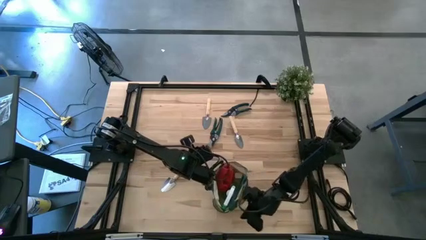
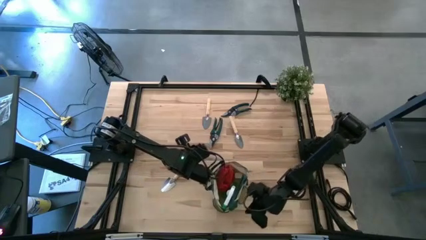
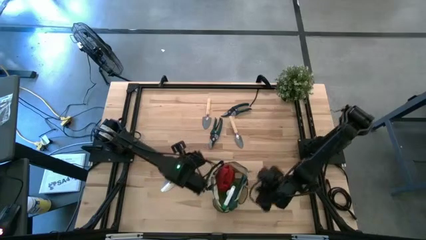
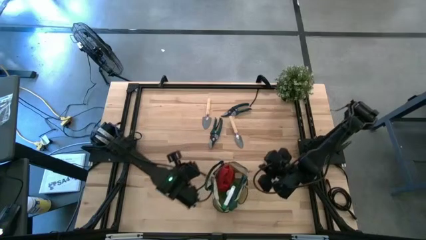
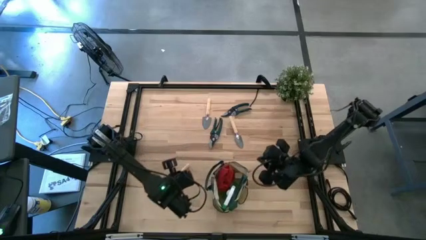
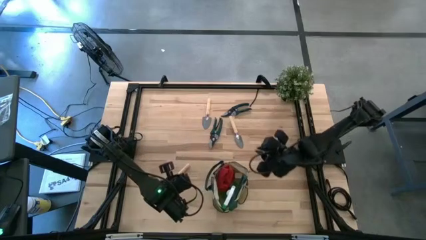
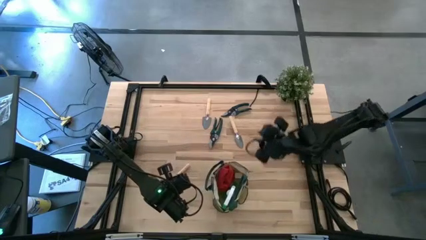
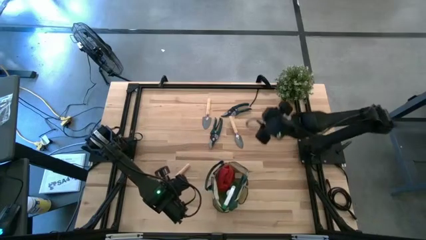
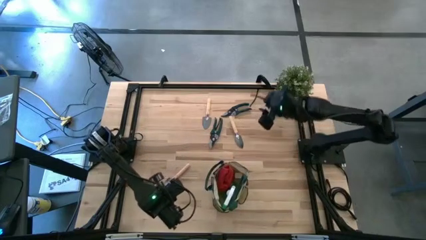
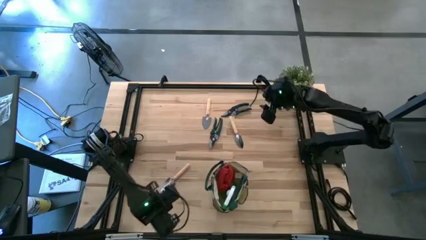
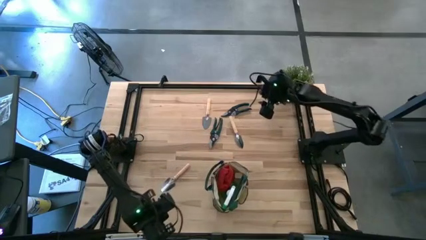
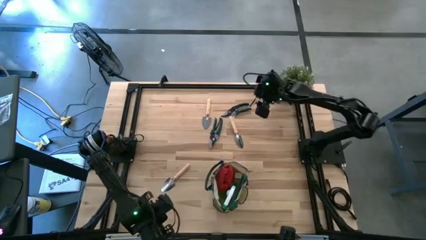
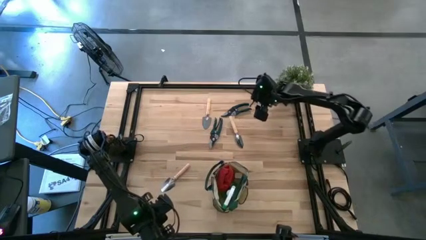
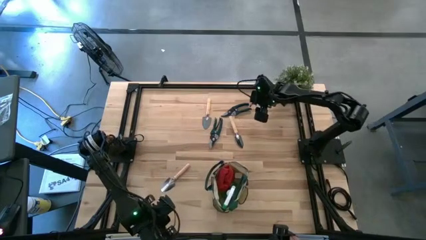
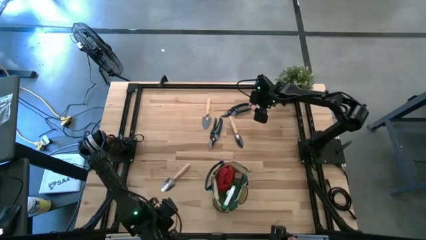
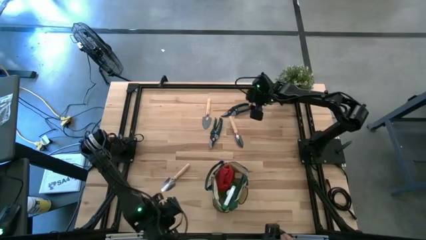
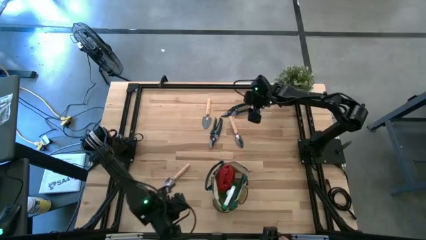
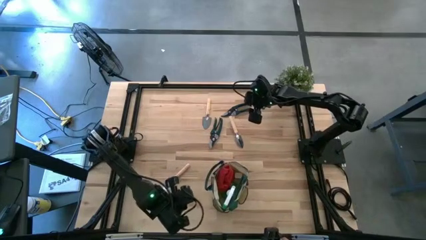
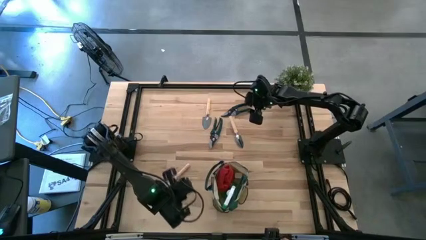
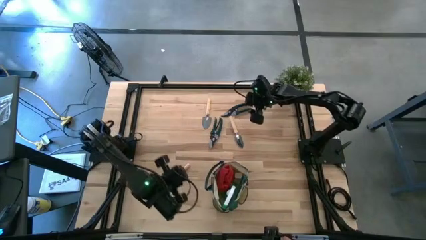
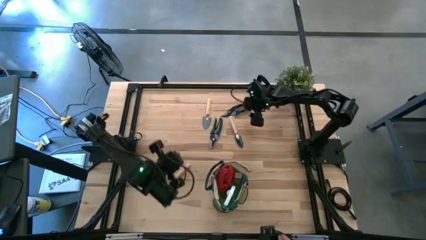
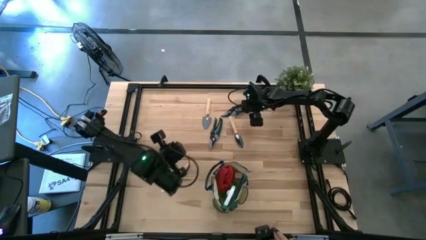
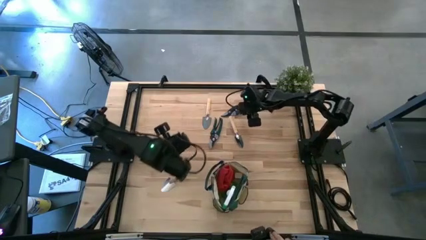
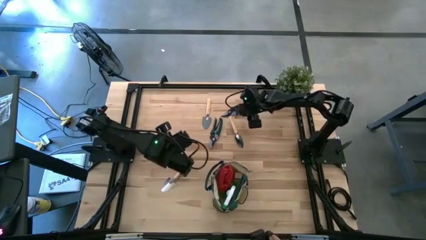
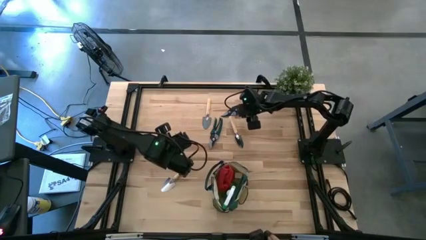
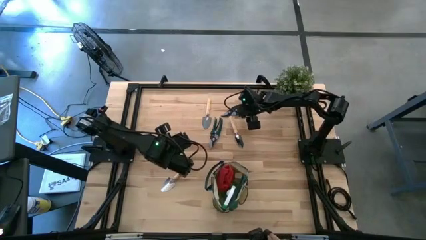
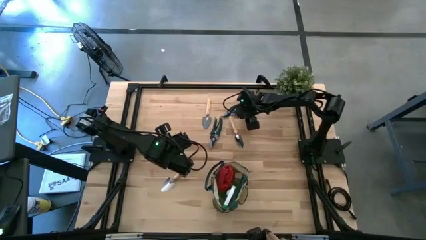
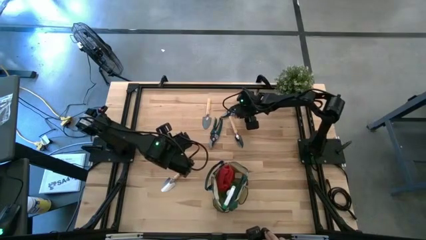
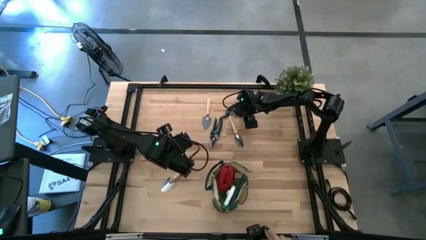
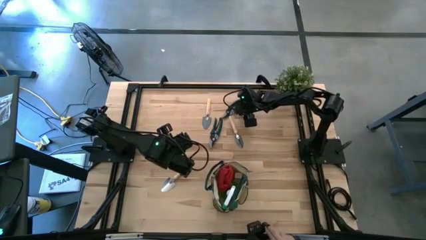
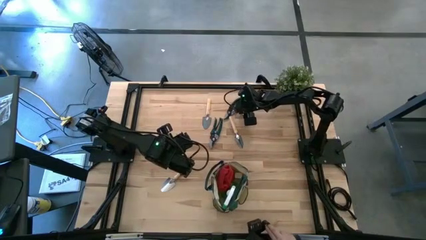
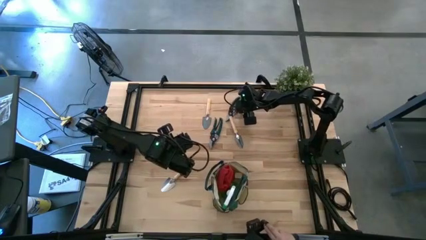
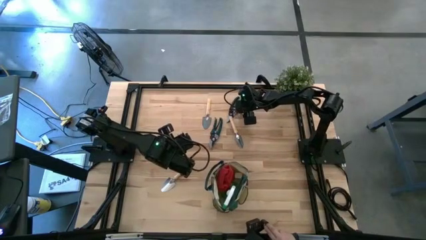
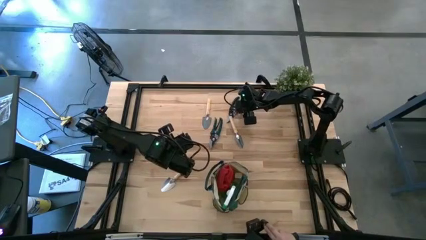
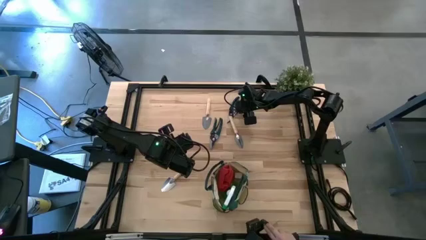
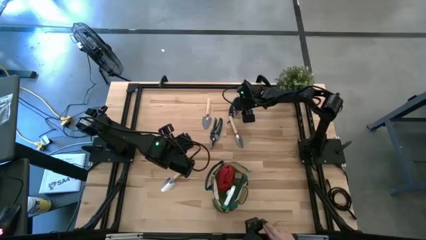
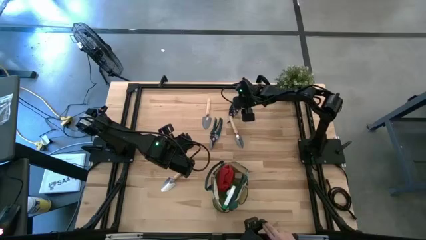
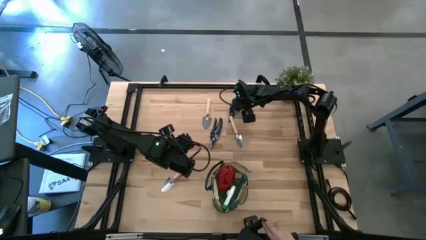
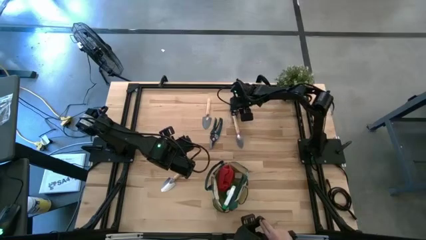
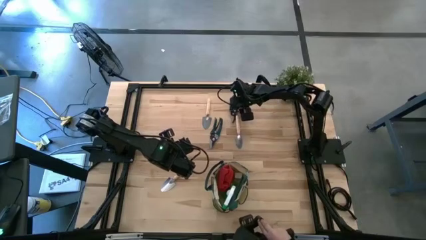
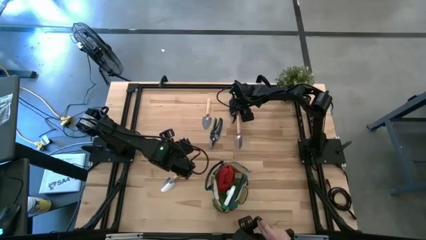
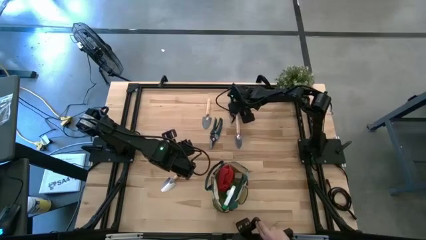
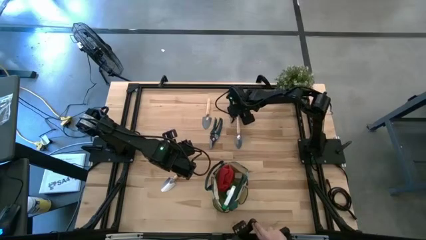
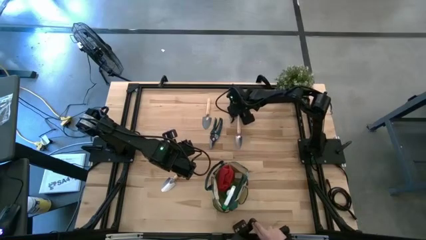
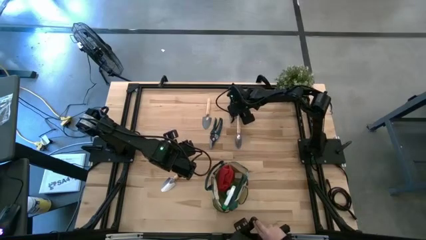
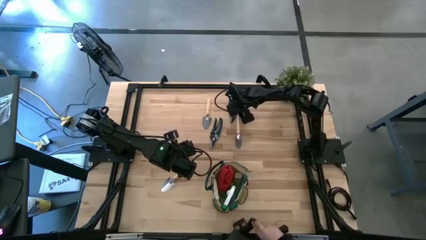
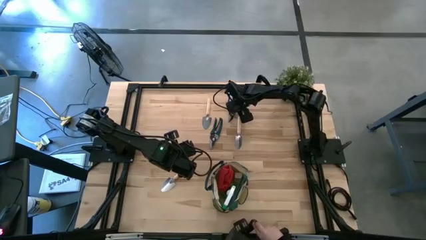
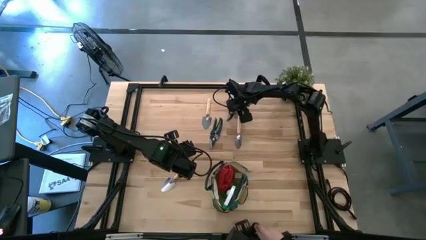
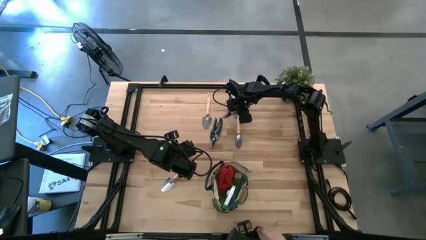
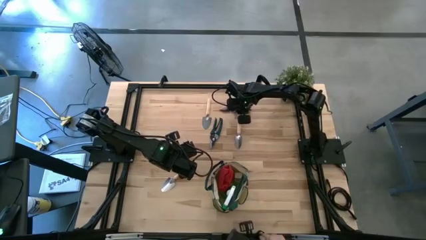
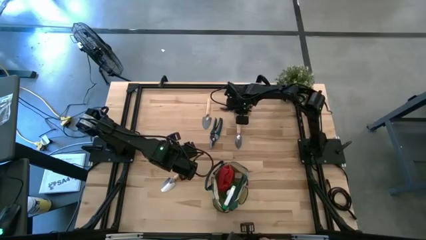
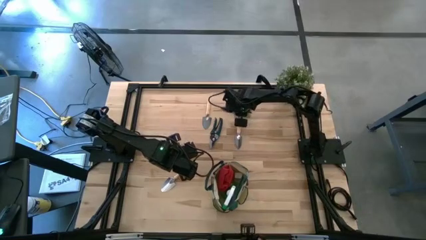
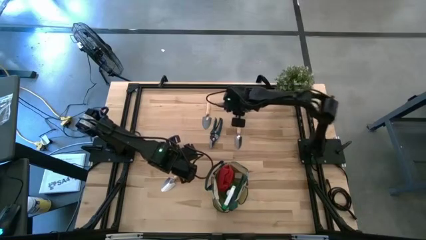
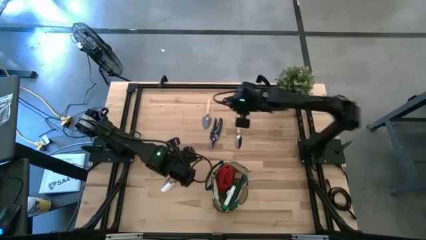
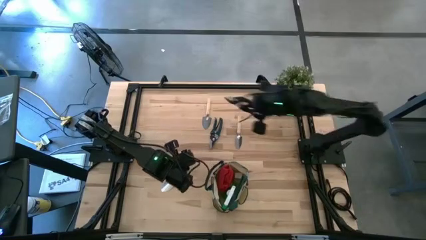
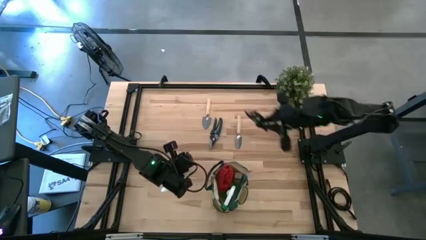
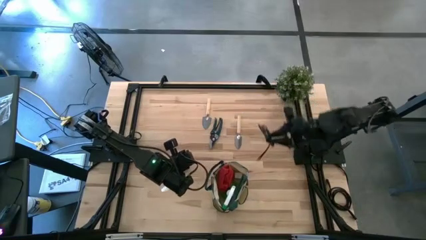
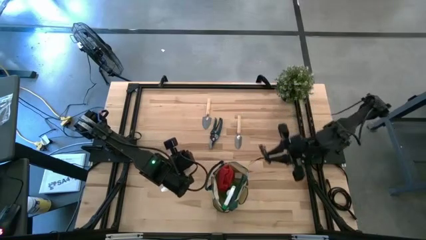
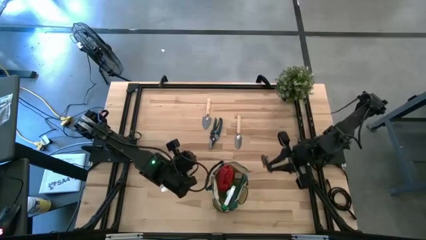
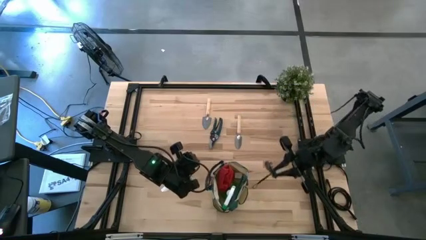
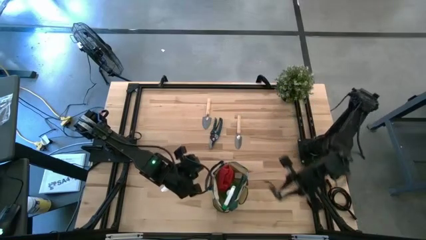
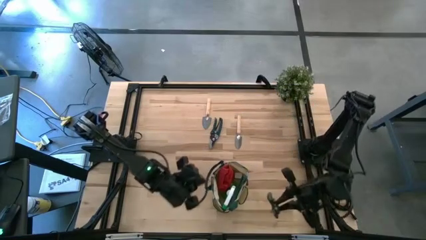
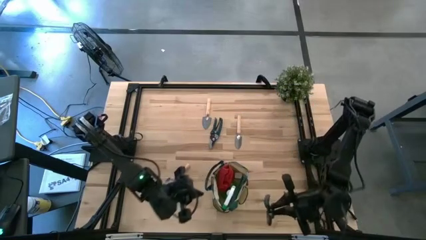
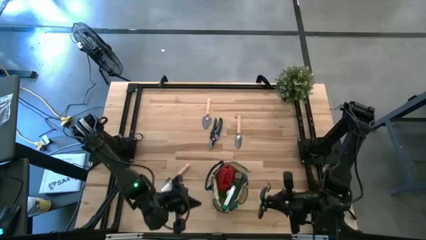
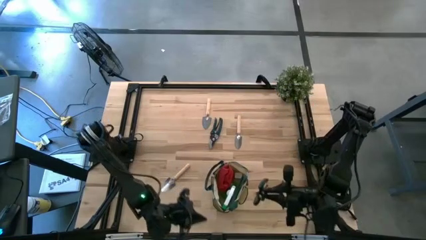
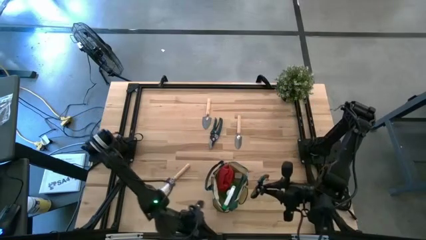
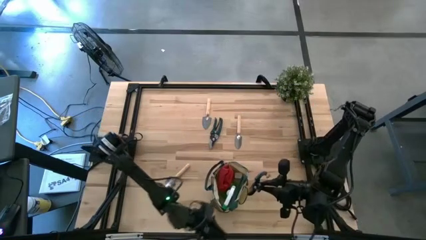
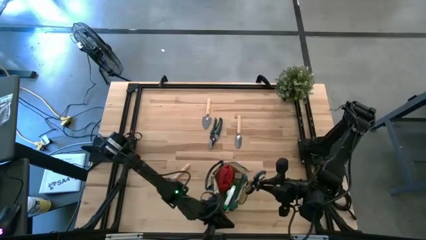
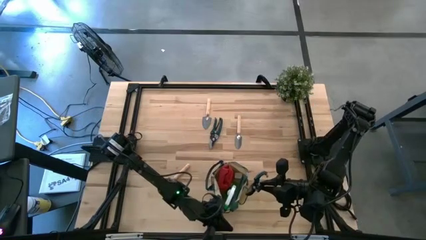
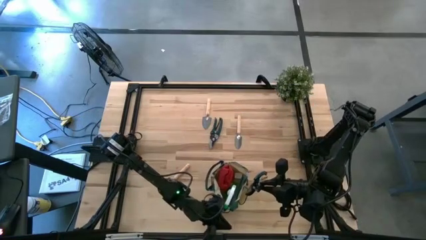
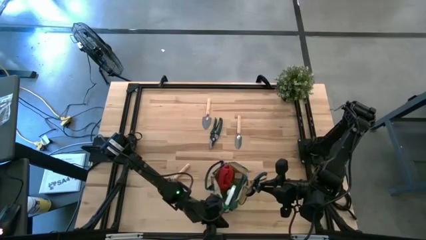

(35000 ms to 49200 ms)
Task: Pick & Place Garden tools in Gardening bag
Put the top shear scissors into the gardening bag
